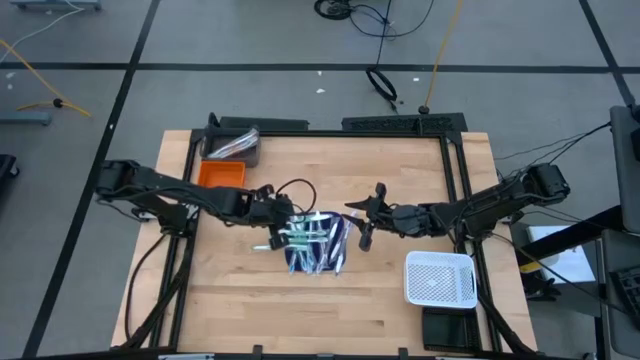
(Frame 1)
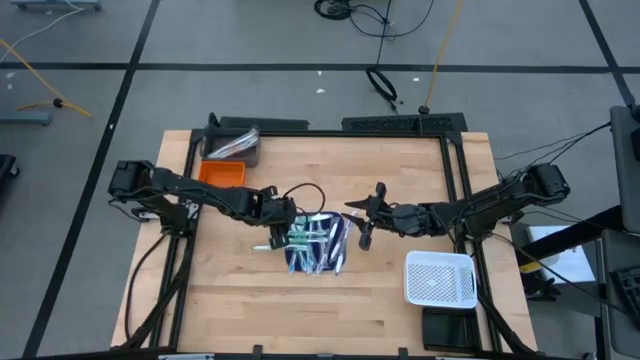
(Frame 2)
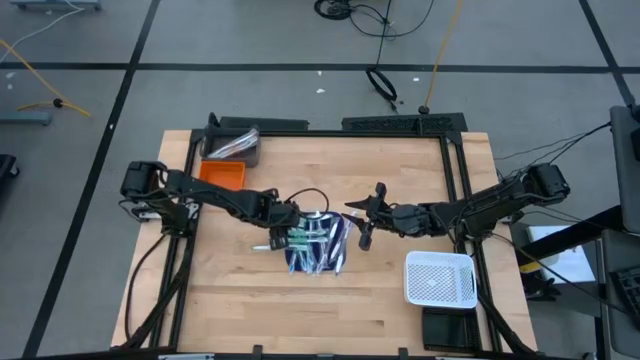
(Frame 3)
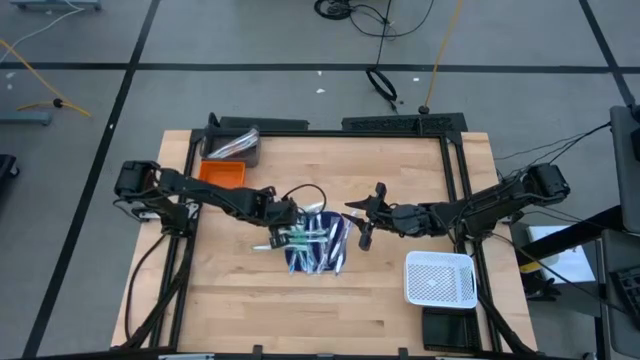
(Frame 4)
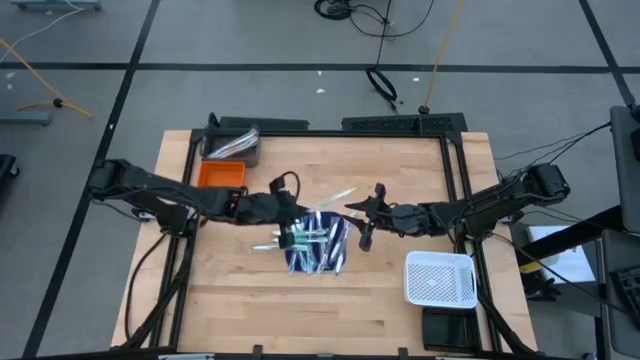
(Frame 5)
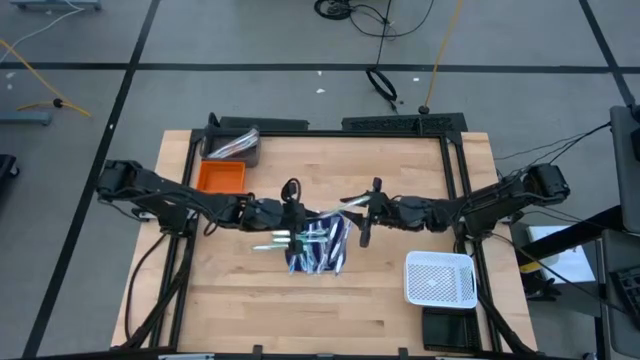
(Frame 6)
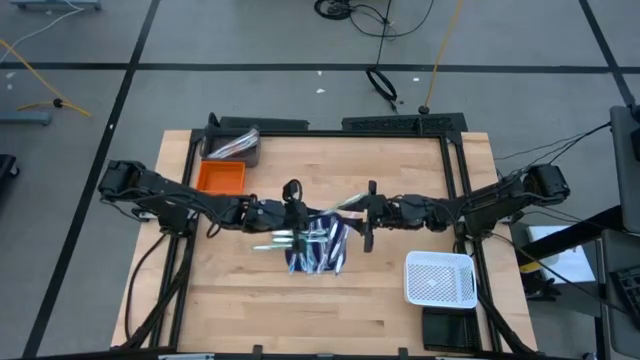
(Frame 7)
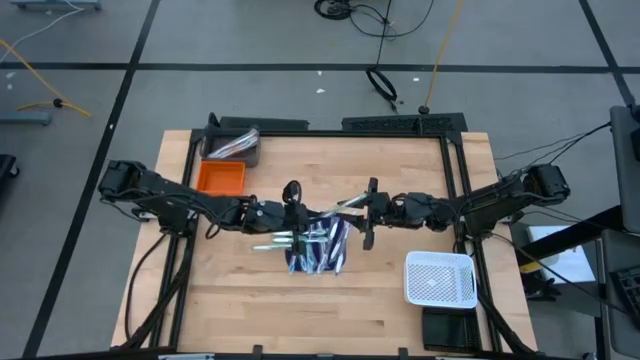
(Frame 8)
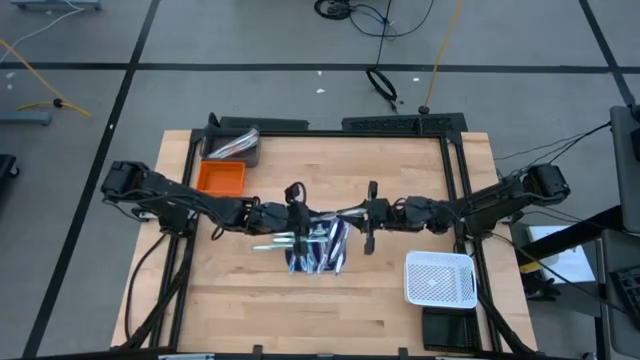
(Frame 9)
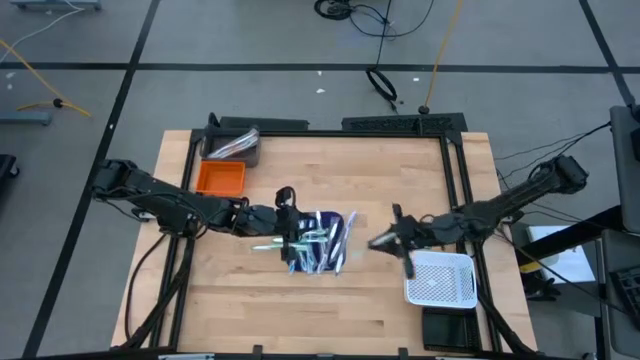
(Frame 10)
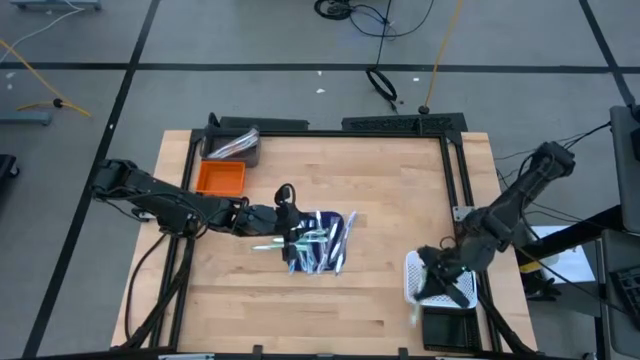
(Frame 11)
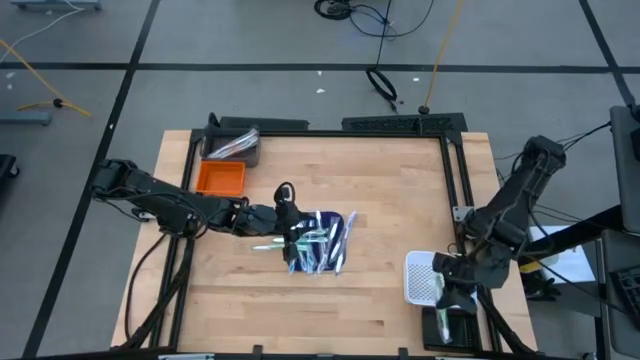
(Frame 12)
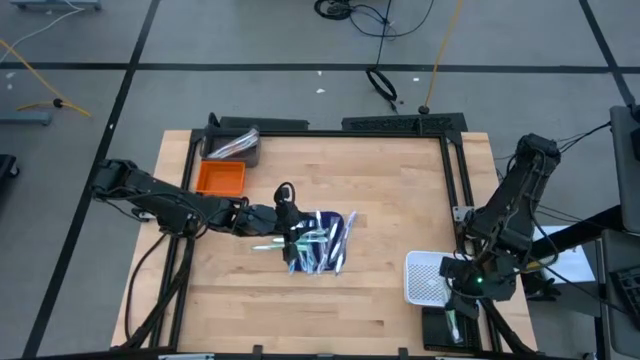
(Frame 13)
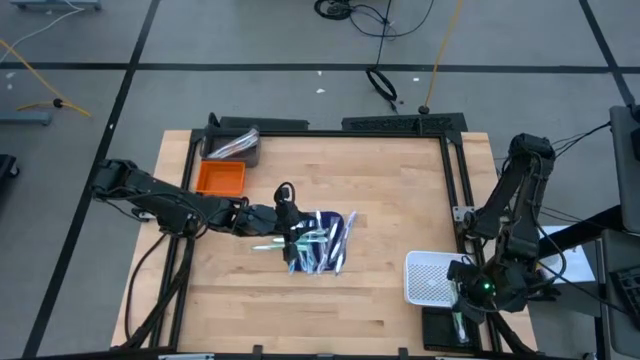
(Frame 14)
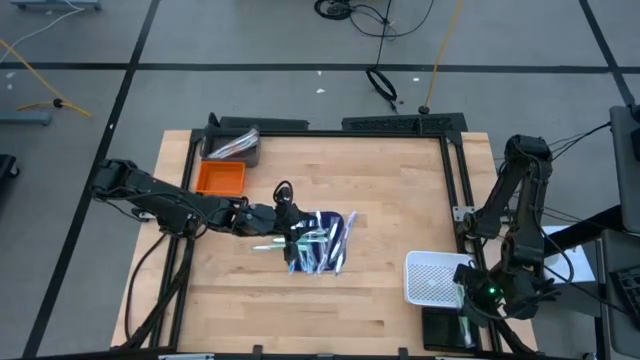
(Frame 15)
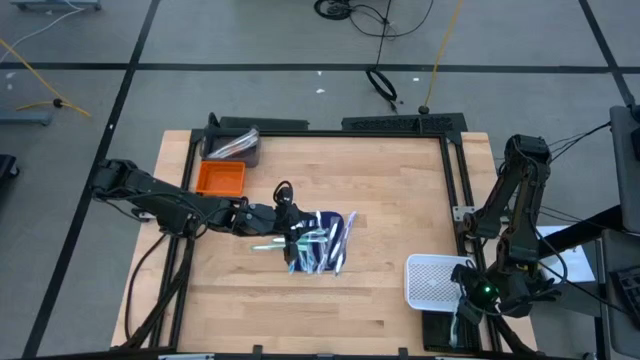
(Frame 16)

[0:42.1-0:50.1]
Task: Pick & Place Toothbrushes
Put the green toothbrush into the black bin

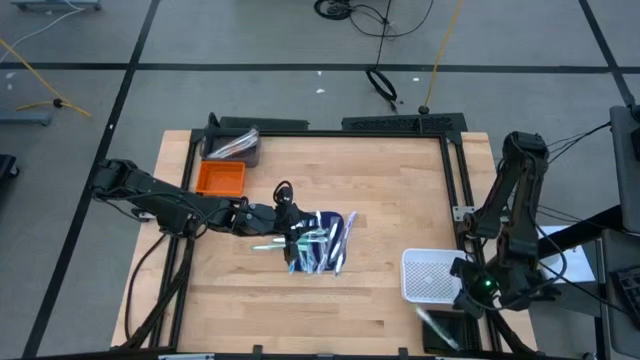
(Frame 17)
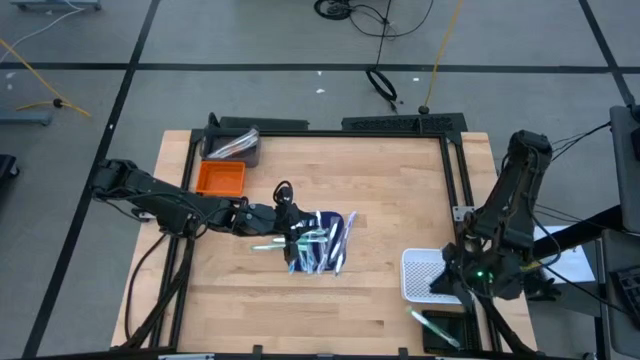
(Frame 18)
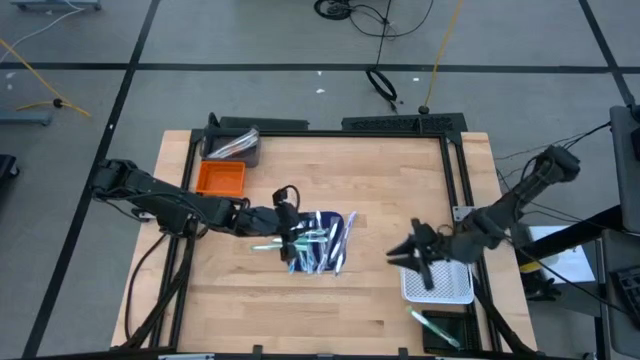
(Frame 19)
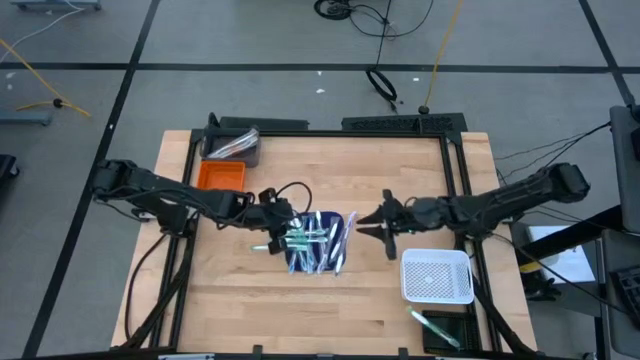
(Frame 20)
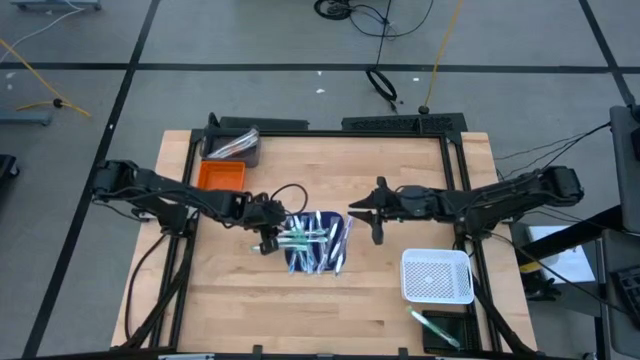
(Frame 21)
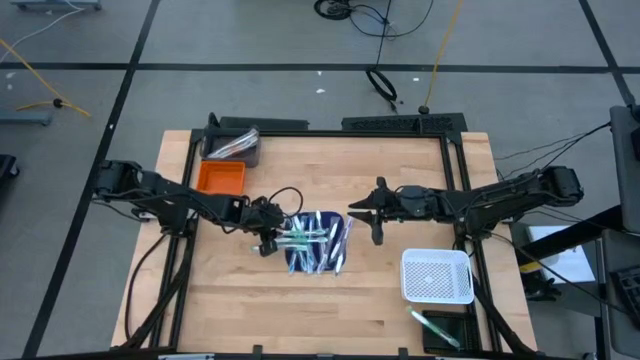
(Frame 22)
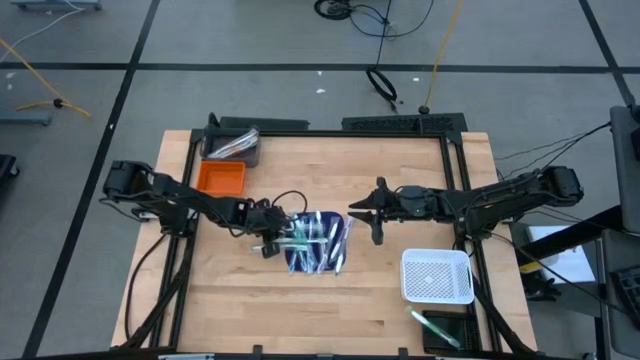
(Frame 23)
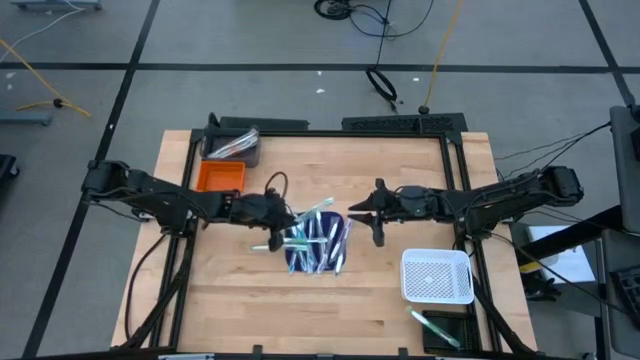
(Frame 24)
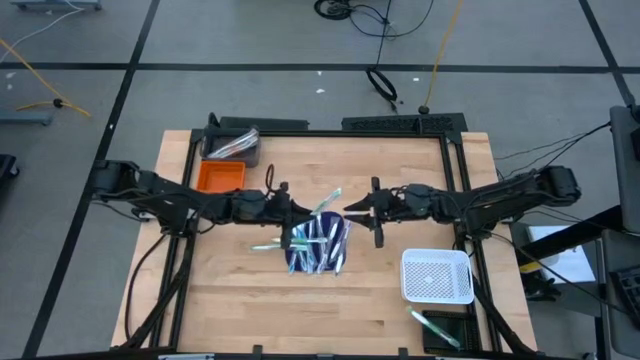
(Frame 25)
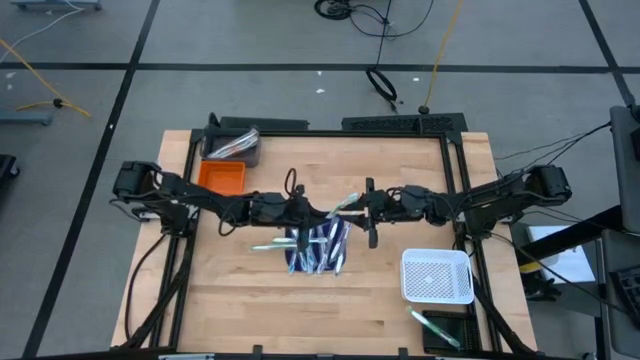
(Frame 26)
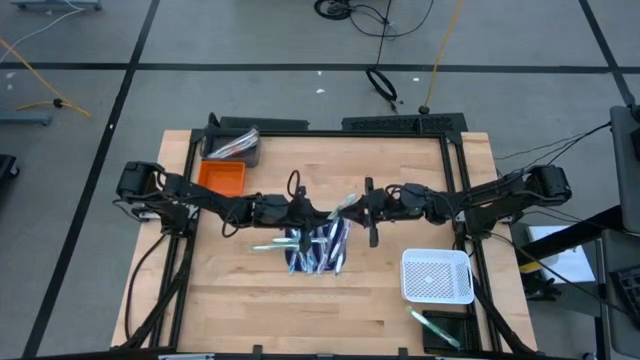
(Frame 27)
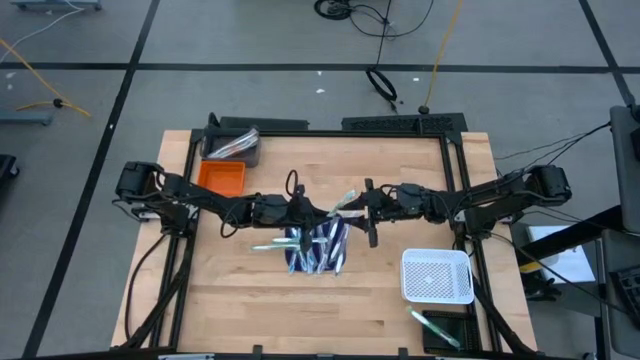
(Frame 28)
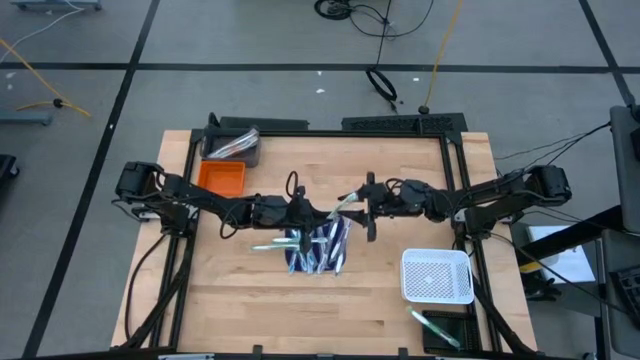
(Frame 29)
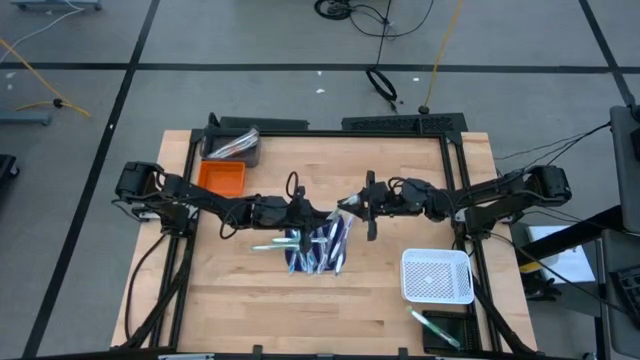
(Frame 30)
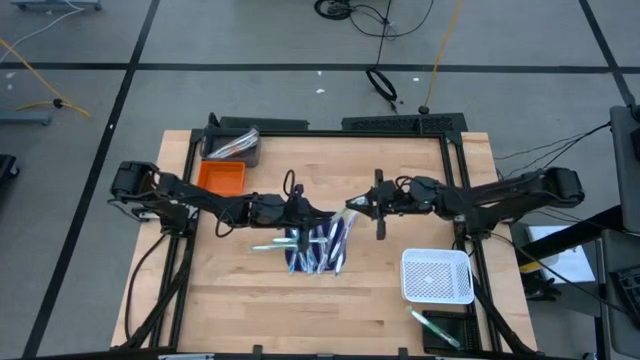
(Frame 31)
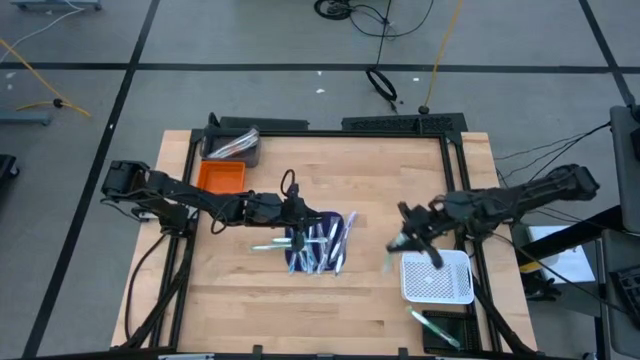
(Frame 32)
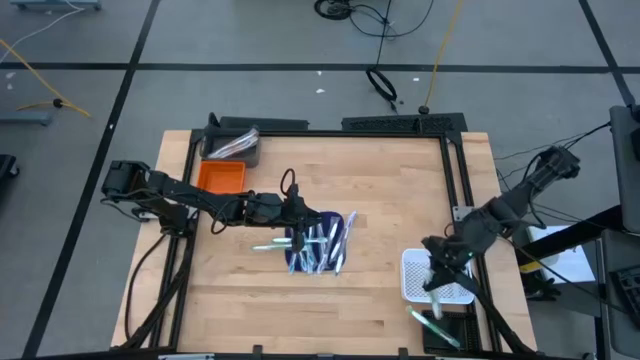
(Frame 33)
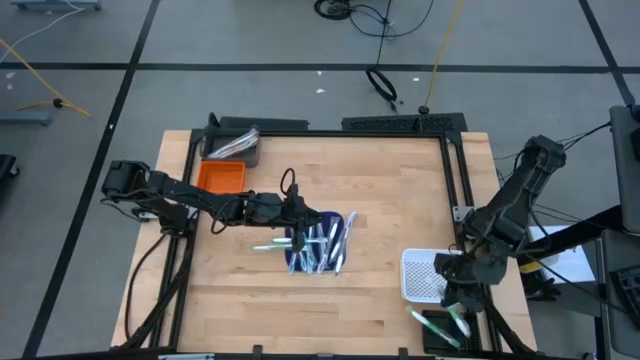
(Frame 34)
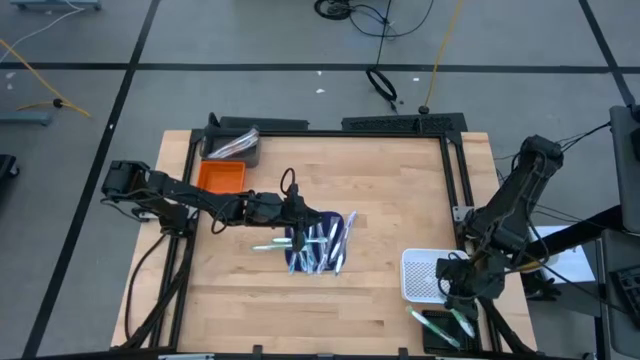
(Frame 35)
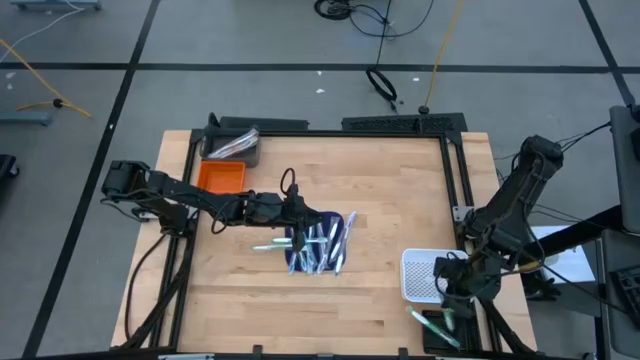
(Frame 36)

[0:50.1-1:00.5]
Put the green toothbrush into the black bin

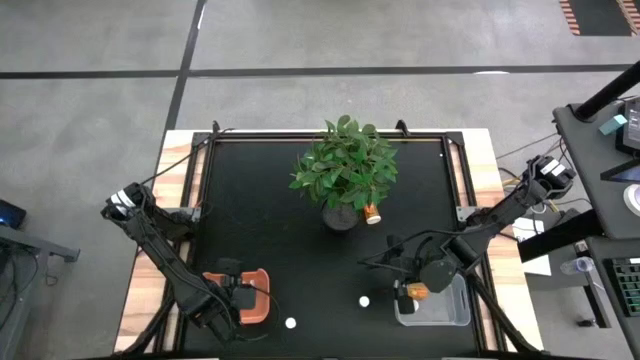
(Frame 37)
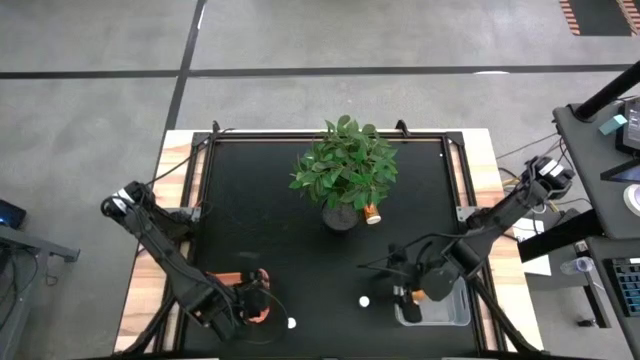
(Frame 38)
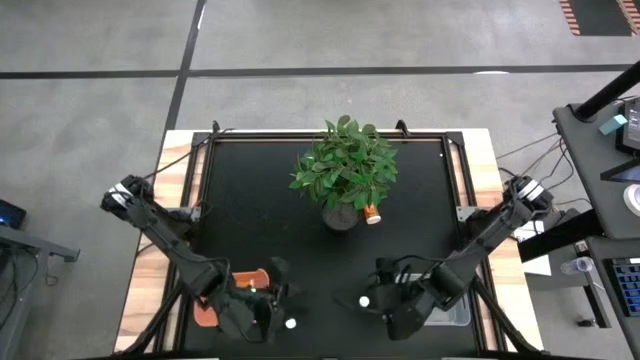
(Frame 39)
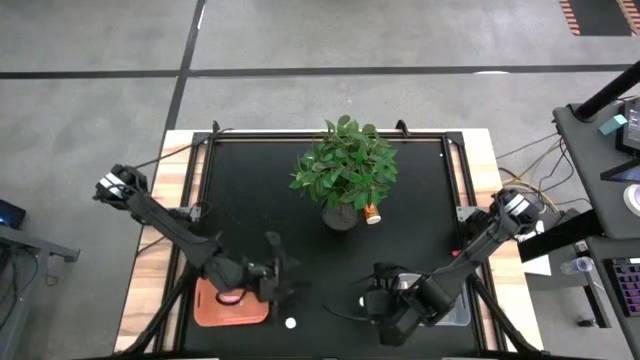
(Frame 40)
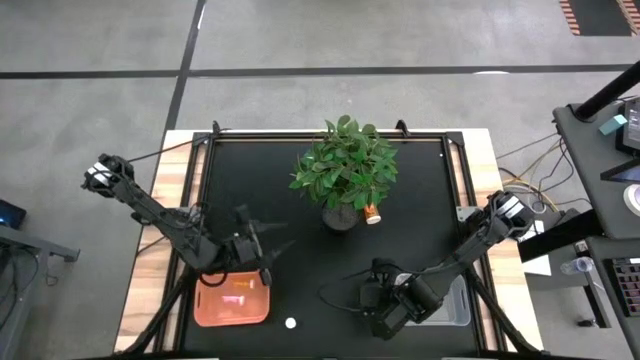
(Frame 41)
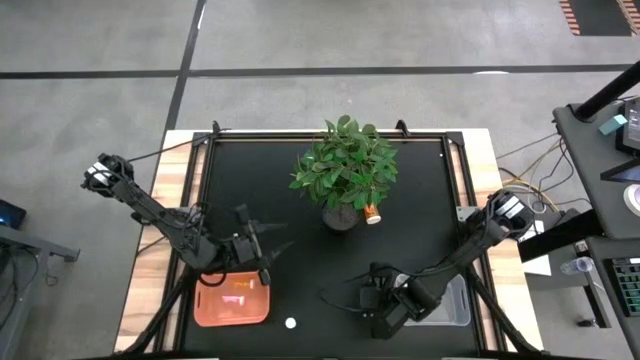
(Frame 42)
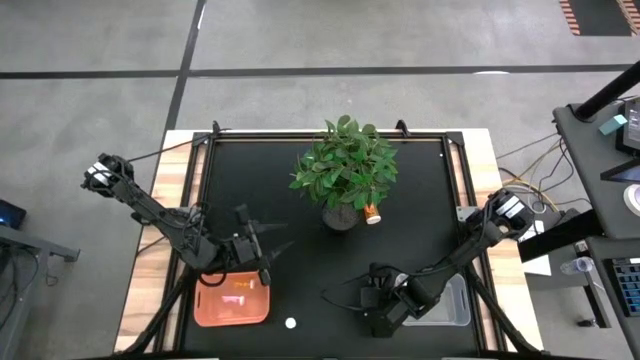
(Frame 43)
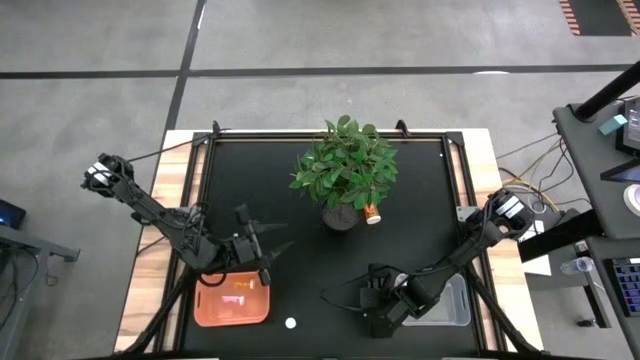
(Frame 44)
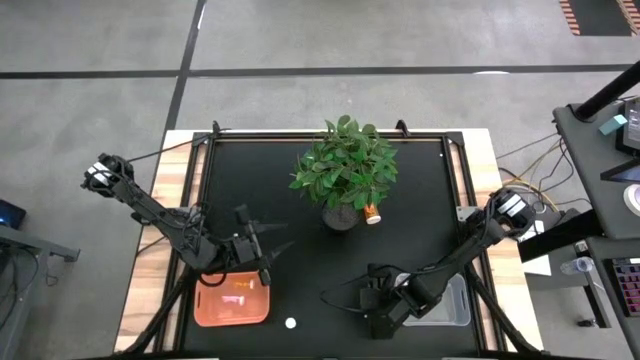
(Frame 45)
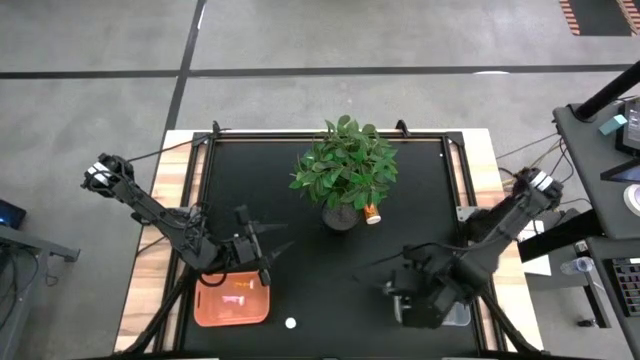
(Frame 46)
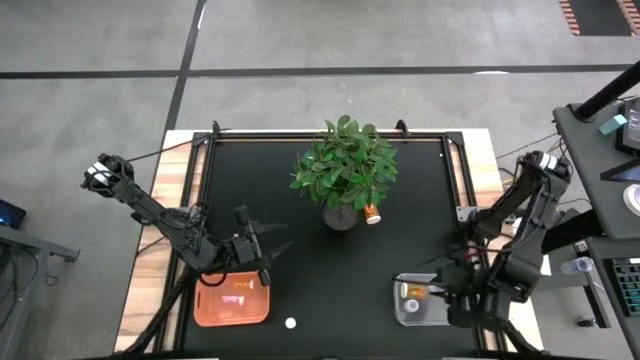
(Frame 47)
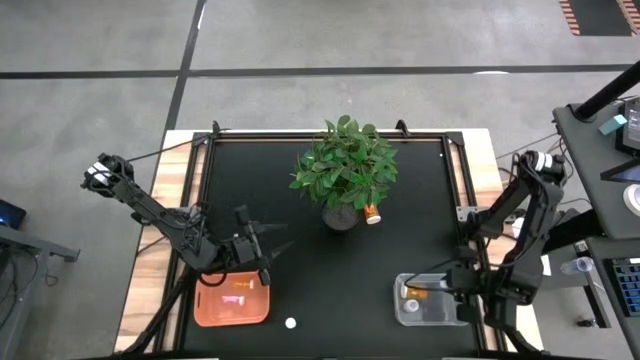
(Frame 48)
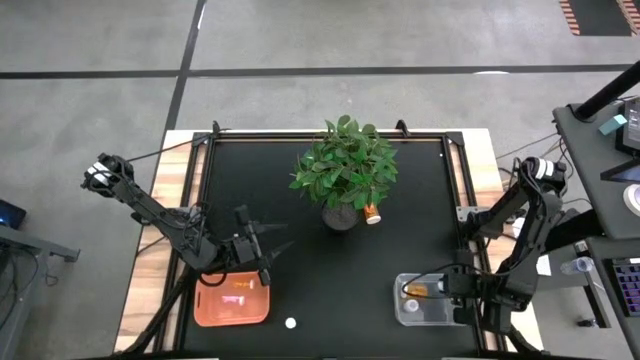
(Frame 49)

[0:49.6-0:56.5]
Task: Pick and place medicine bottles into bin by pill shape (circle, oval)
Put the green capsule bottle into the transparent bin
